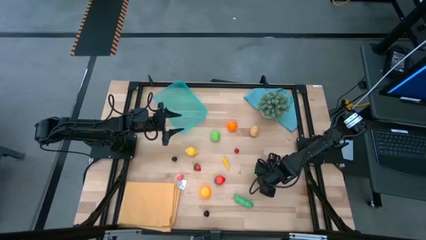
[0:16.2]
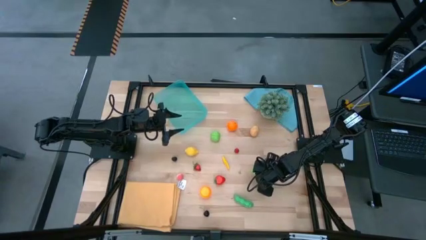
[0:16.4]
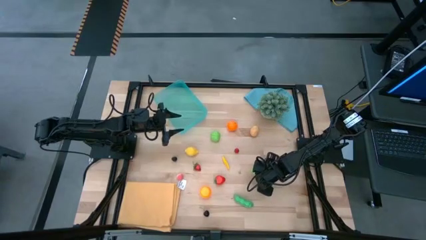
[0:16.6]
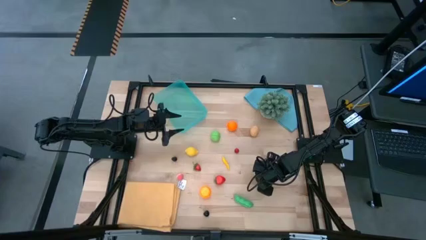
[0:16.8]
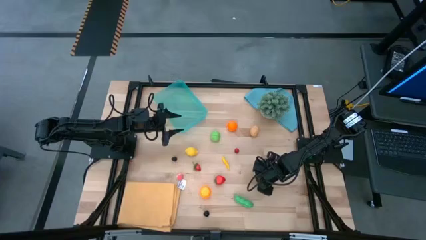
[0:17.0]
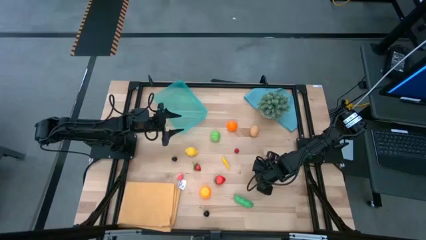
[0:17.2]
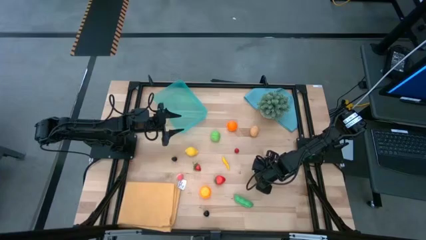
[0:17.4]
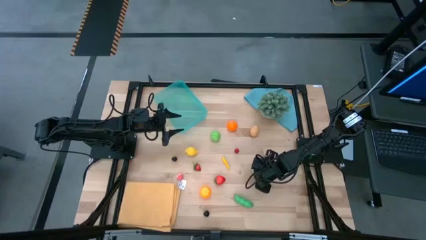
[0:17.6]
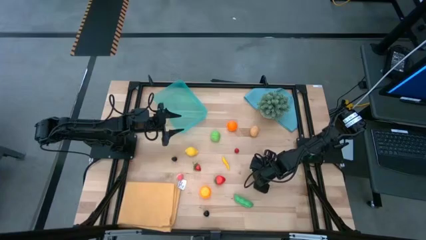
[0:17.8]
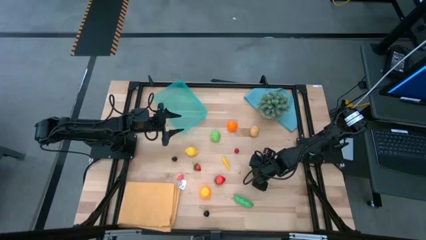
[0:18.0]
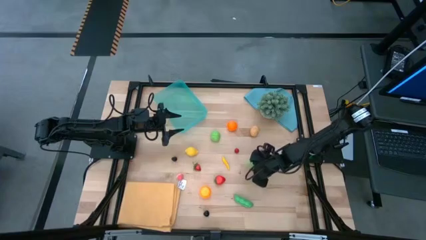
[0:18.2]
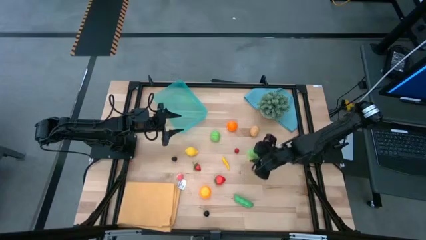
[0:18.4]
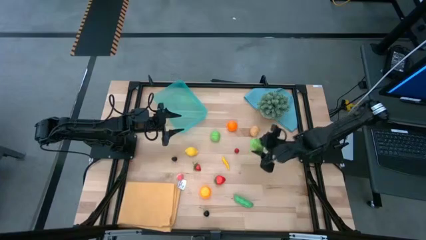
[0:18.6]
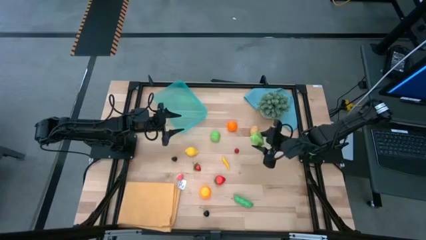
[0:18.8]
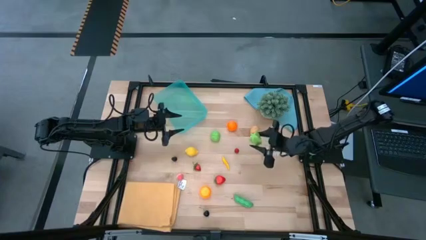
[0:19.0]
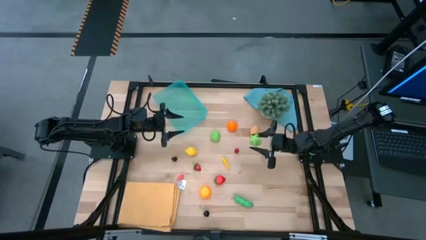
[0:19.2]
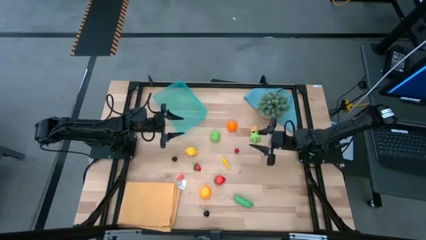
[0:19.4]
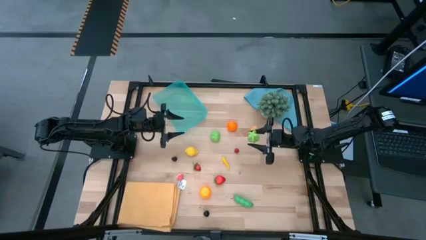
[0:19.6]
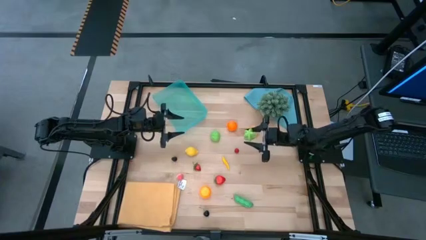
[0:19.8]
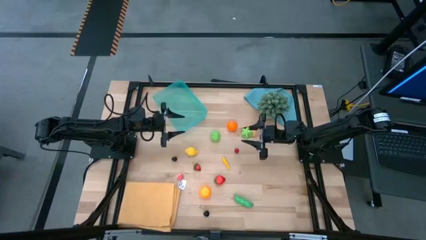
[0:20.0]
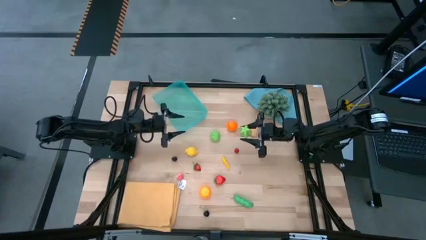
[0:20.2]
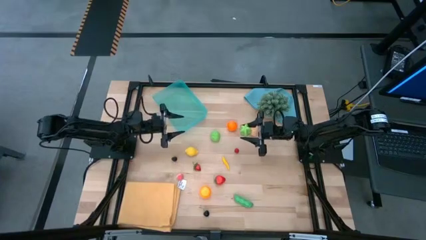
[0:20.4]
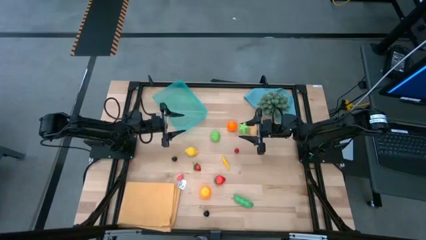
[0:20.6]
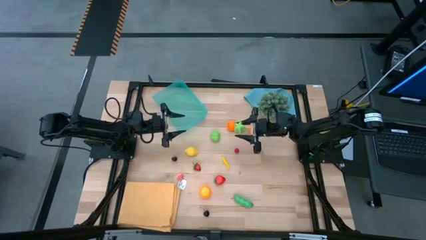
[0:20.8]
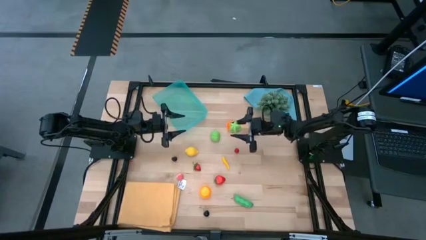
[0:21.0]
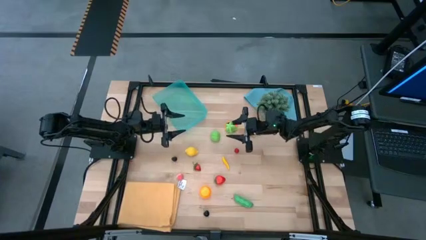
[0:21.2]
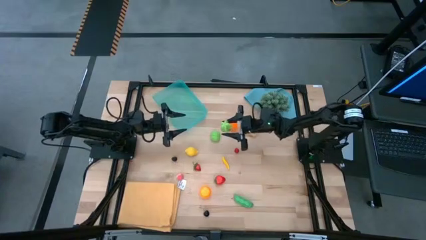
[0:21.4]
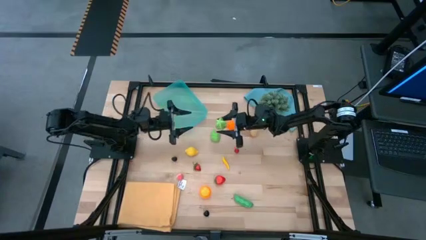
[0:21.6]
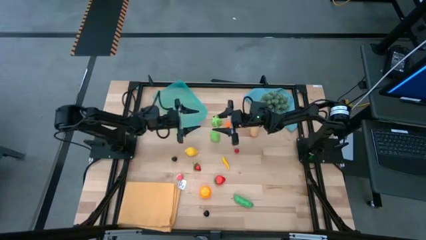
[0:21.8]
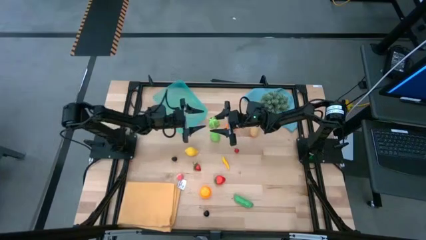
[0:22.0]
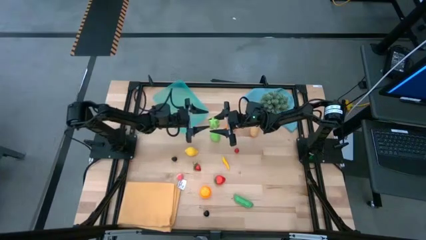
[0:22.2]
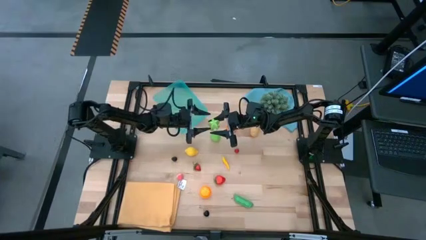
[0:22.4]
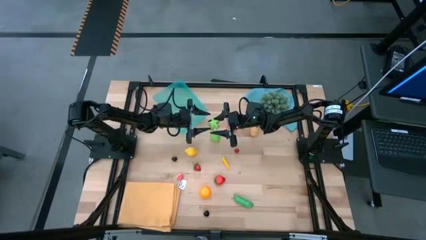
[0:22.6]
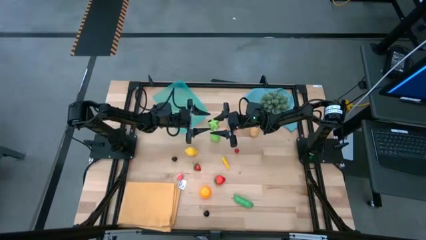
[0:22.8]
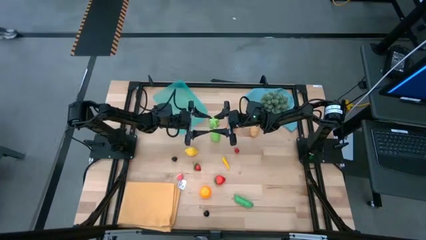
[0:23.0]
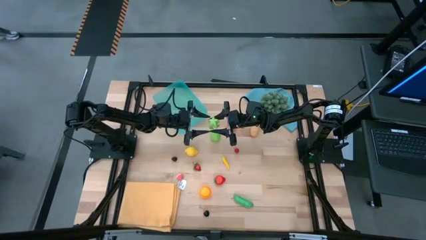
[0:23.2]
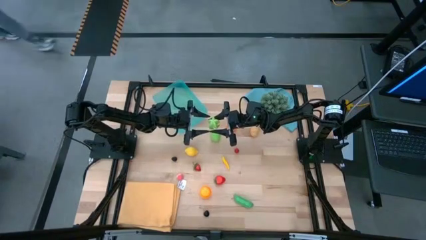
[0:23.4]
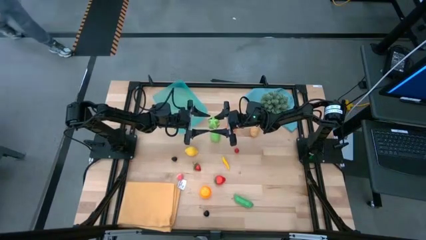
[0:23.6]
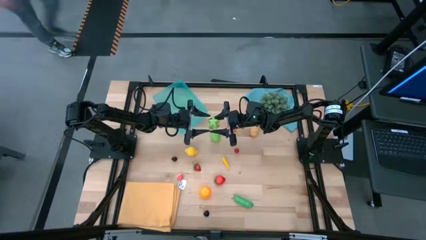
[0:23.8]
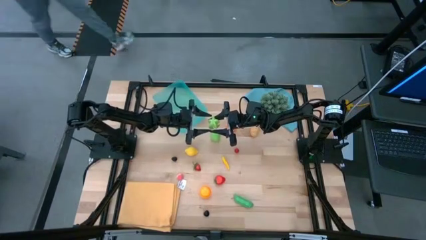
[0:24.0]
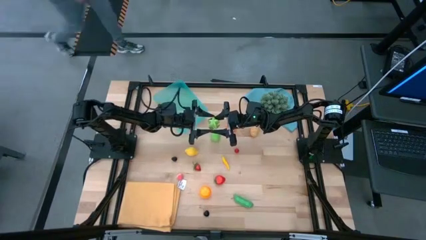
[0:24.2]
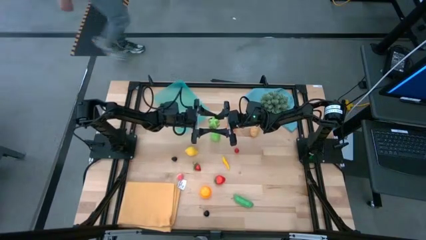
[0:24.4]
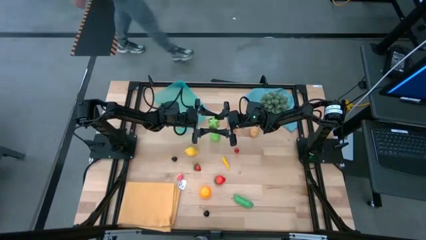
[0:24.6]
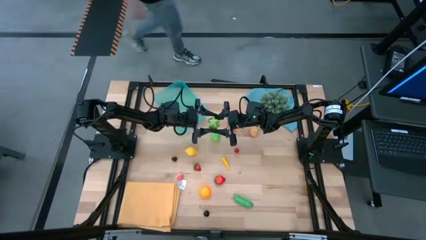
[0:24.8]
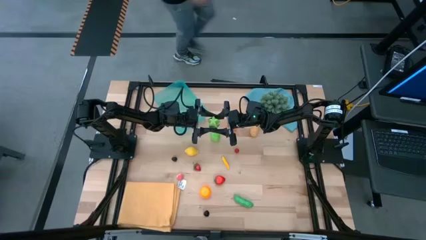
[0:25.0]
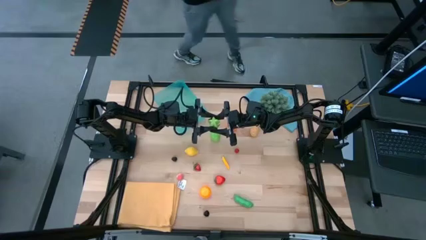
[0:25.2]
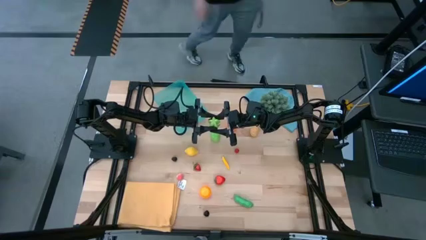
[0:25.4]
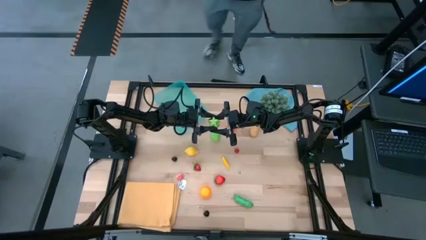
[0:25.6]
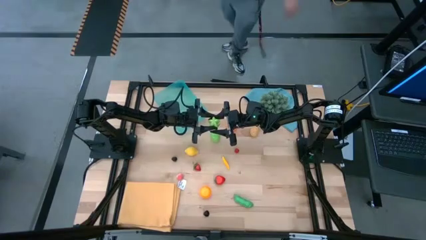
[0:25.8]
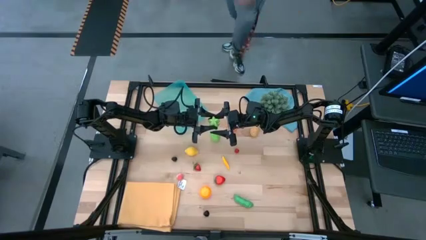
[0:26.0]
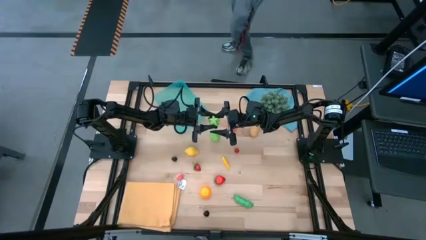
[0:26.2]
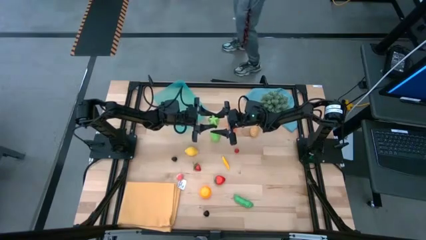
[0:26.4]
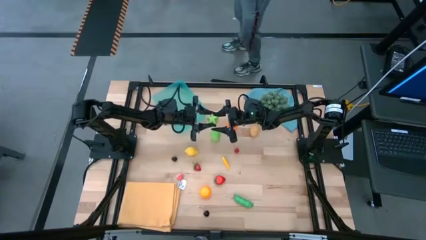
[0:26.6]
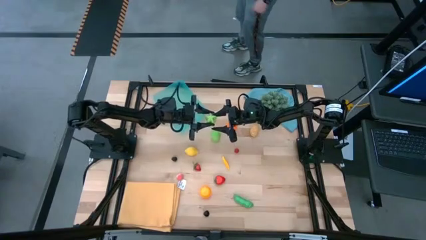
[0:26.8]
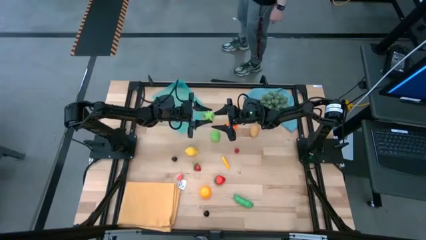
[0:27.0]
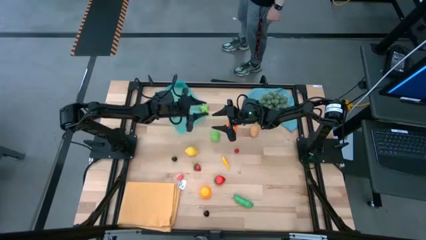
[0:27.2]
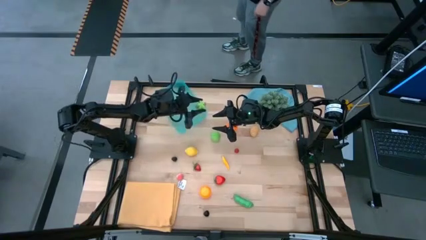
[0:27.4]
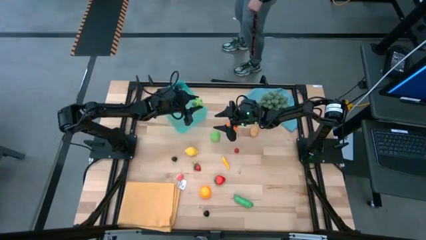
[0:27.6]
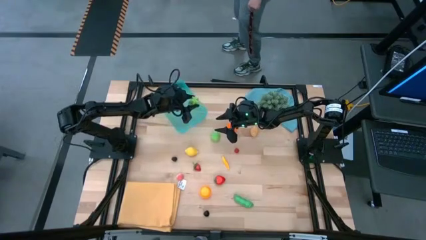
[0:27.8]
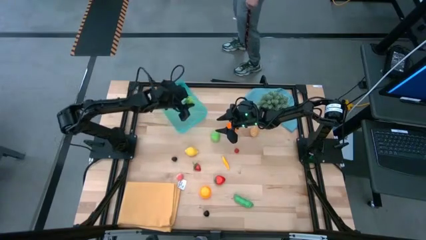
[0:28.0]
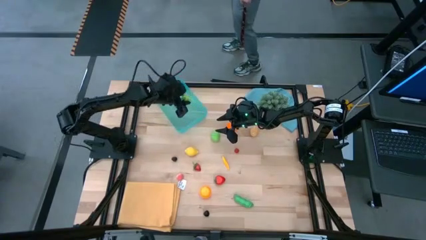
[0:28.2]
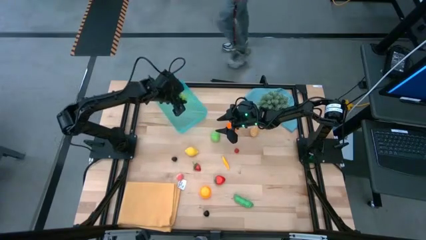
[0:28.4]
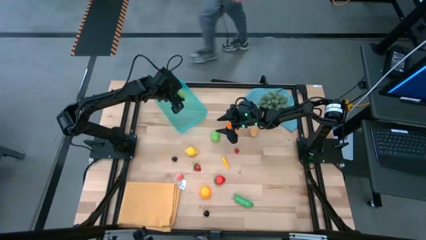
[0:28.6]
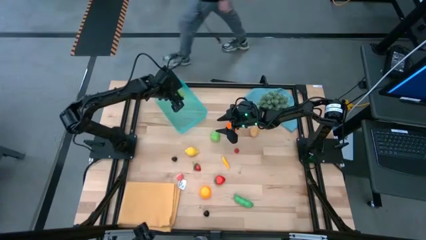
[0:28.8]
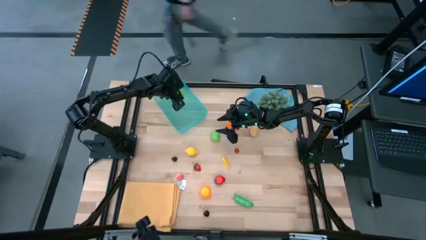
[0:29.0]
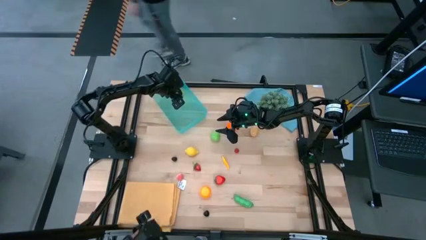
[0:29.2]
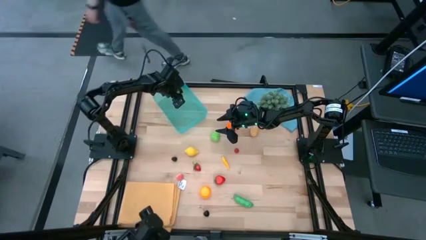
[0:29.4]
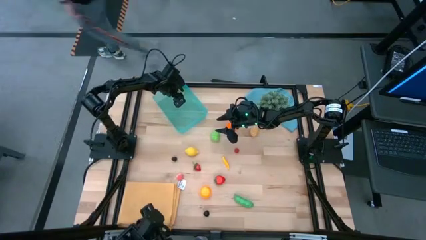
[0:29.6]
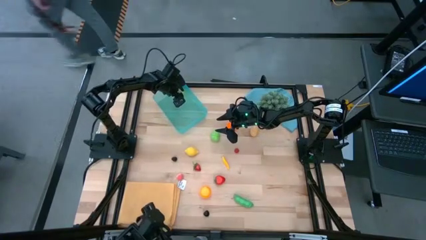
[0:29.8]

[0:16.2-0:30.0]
Task: Pick and placing Produce into tupperware
Put the green starfruit into the blue bin
